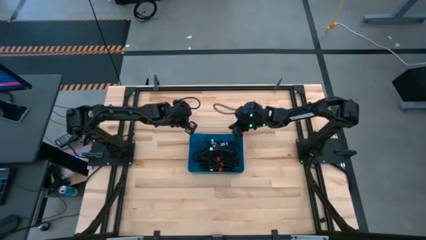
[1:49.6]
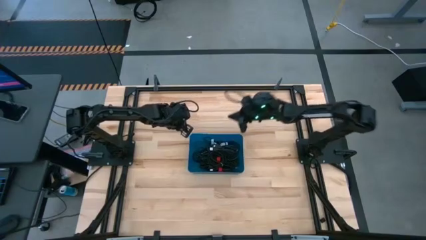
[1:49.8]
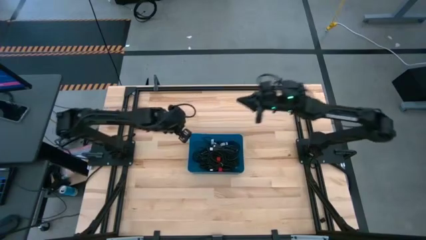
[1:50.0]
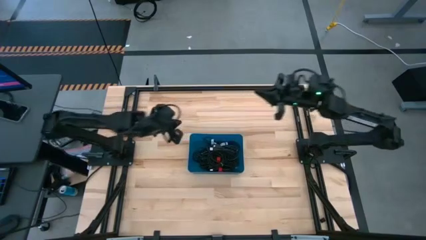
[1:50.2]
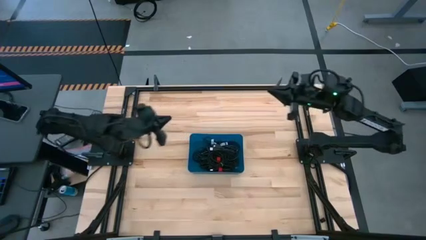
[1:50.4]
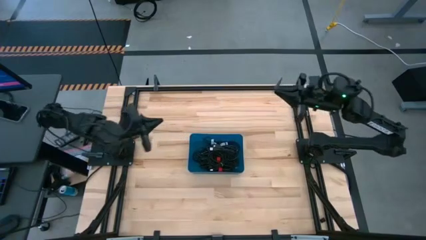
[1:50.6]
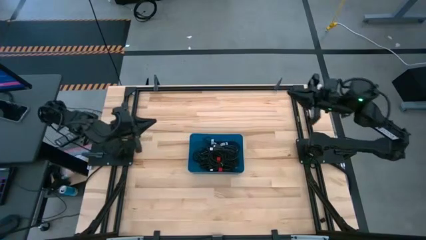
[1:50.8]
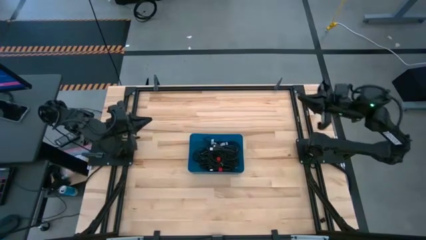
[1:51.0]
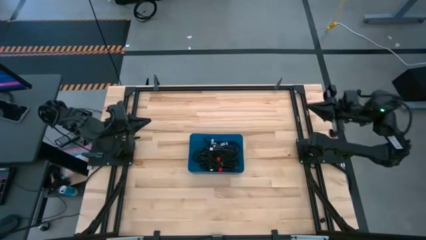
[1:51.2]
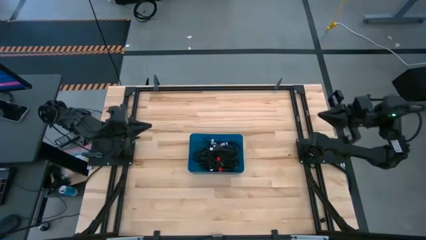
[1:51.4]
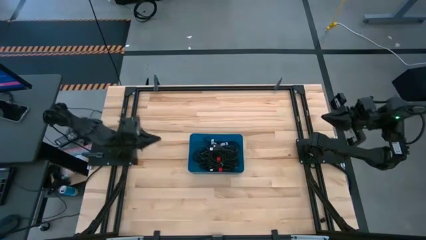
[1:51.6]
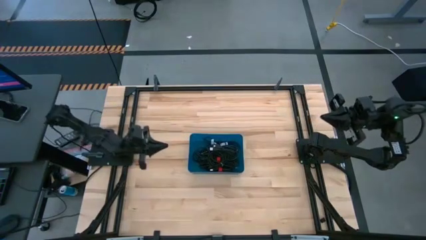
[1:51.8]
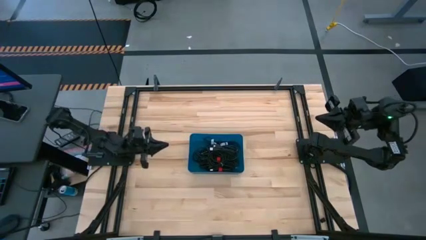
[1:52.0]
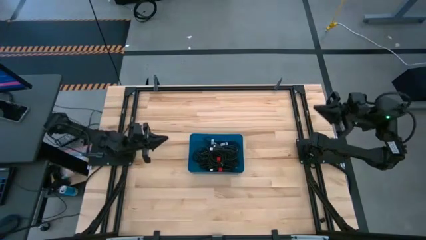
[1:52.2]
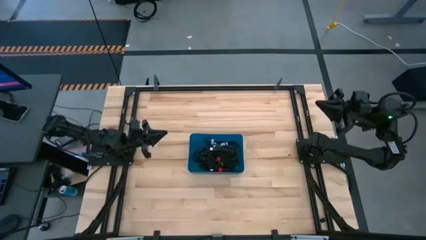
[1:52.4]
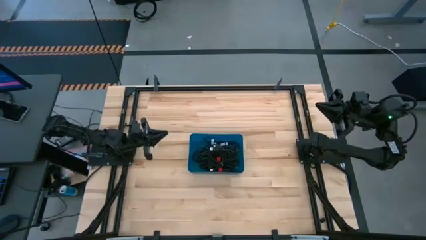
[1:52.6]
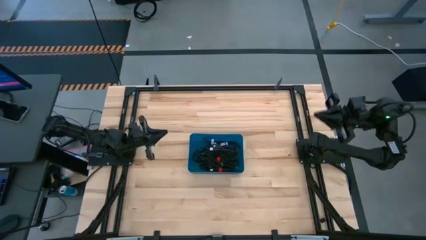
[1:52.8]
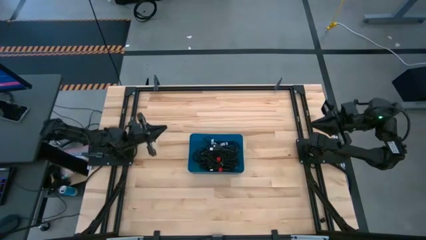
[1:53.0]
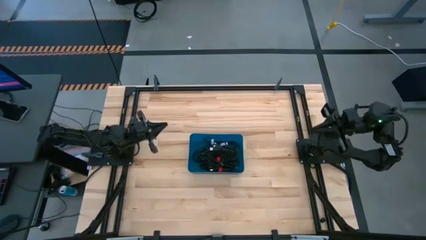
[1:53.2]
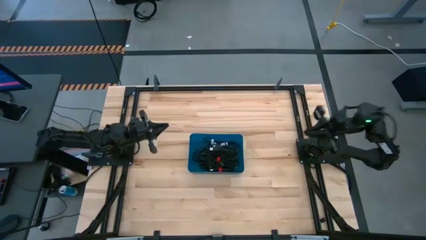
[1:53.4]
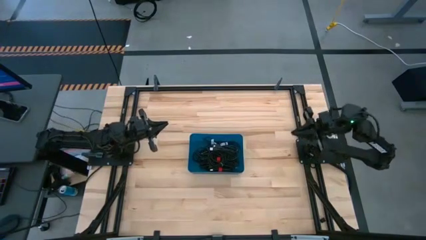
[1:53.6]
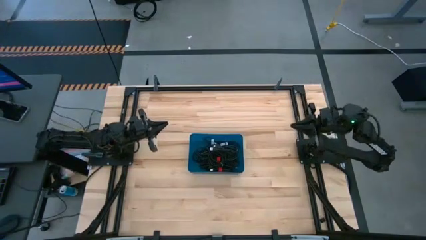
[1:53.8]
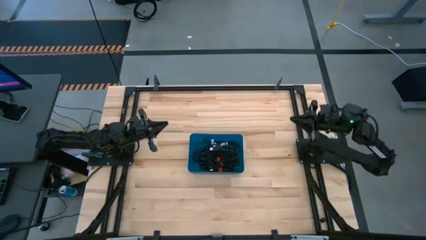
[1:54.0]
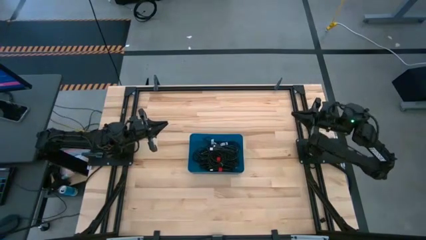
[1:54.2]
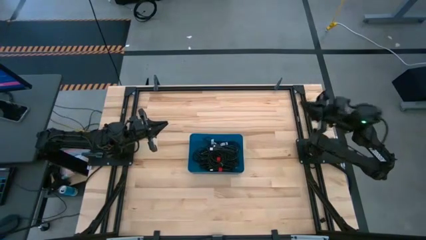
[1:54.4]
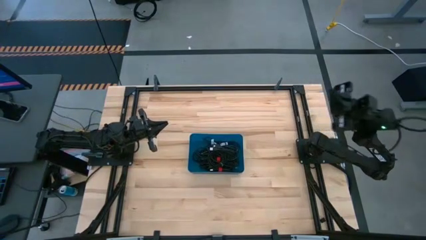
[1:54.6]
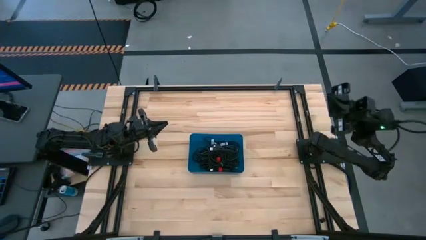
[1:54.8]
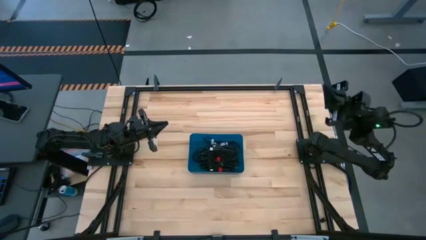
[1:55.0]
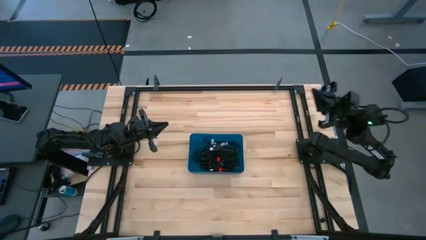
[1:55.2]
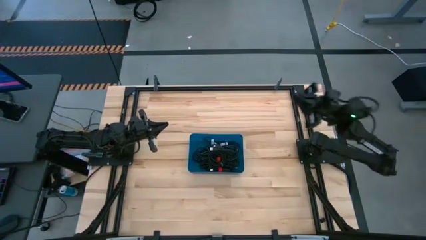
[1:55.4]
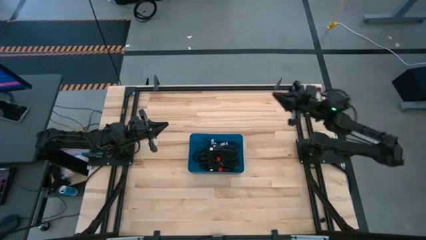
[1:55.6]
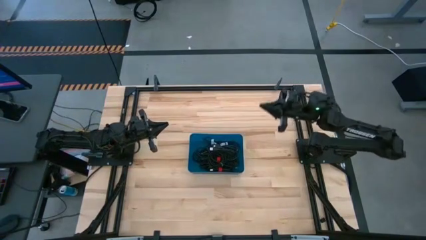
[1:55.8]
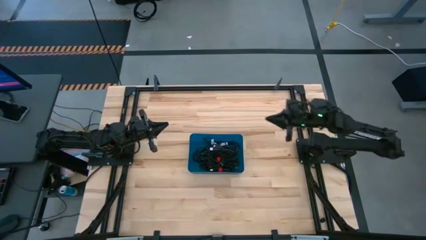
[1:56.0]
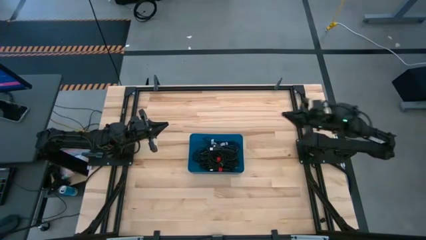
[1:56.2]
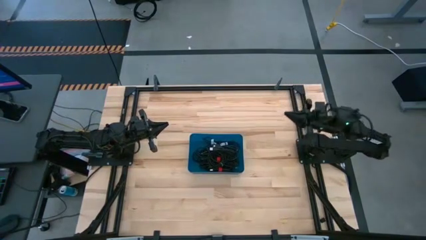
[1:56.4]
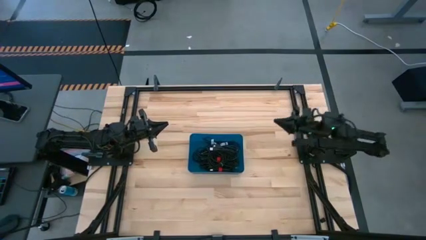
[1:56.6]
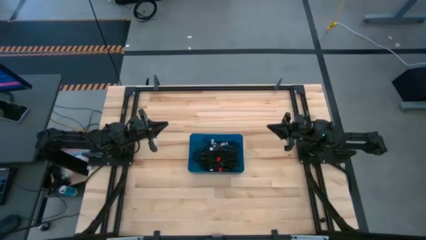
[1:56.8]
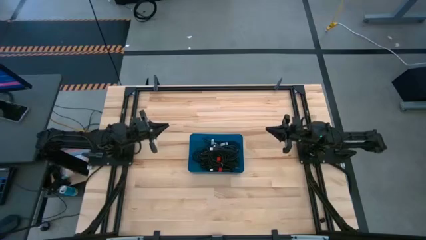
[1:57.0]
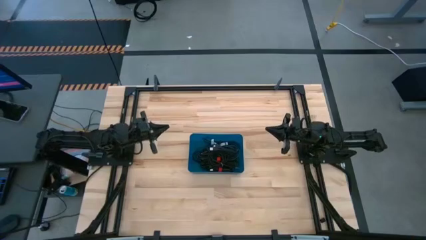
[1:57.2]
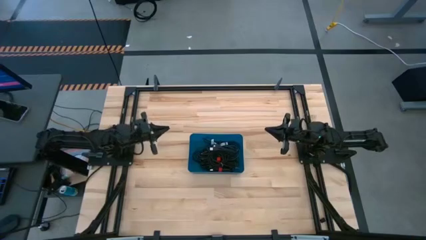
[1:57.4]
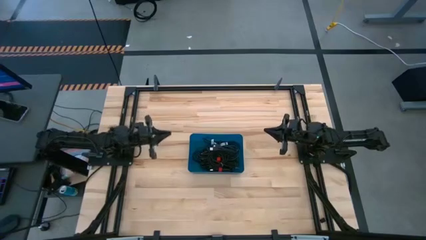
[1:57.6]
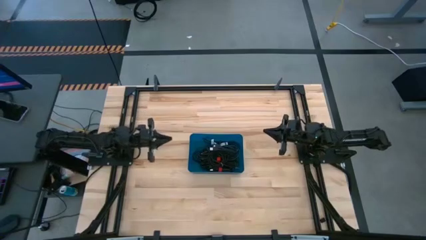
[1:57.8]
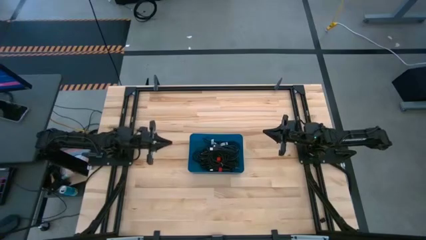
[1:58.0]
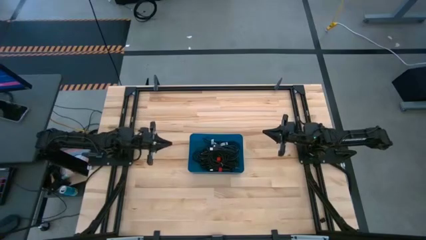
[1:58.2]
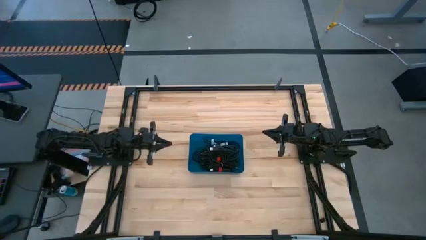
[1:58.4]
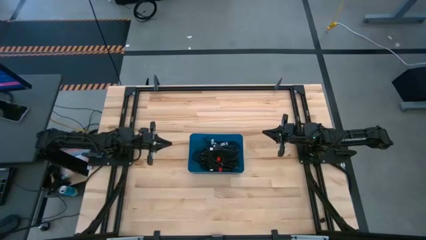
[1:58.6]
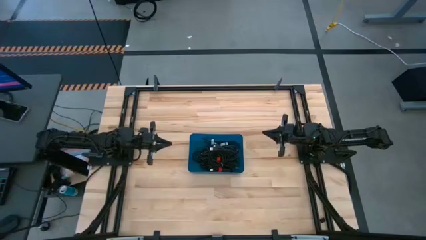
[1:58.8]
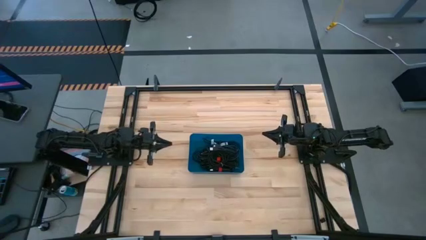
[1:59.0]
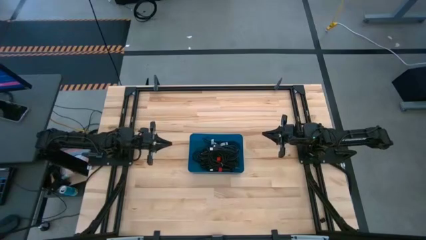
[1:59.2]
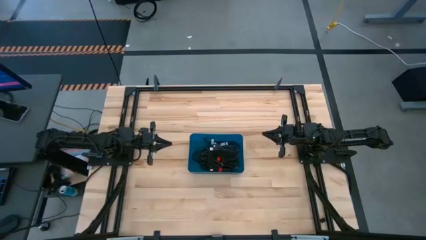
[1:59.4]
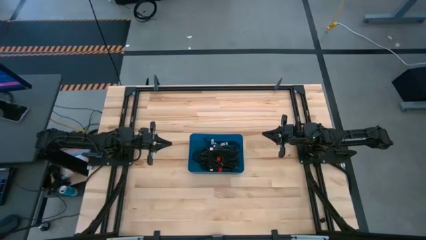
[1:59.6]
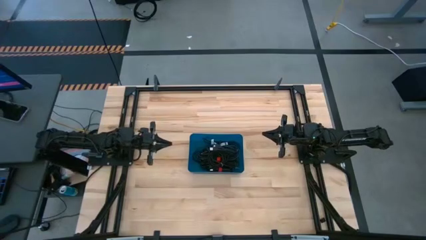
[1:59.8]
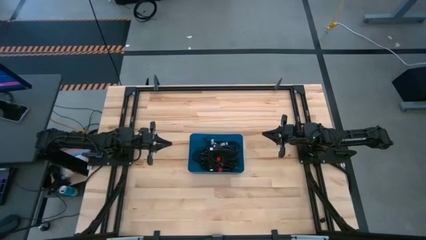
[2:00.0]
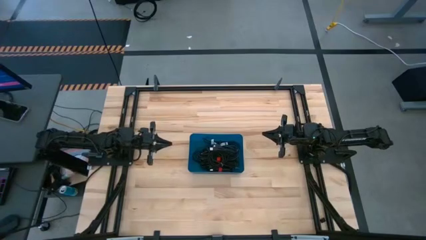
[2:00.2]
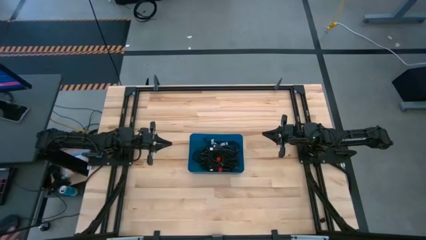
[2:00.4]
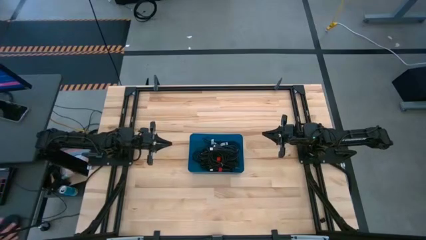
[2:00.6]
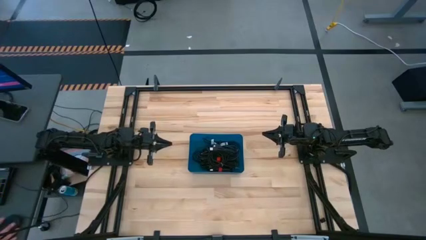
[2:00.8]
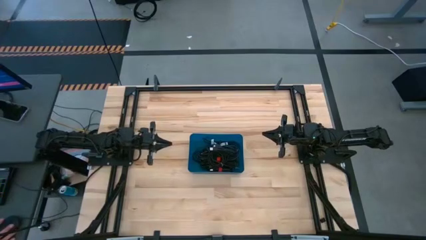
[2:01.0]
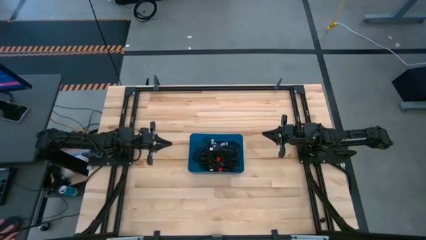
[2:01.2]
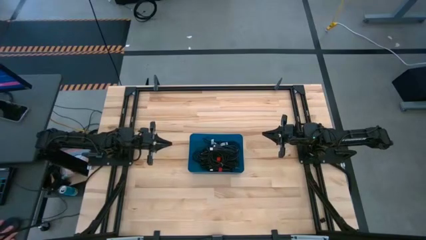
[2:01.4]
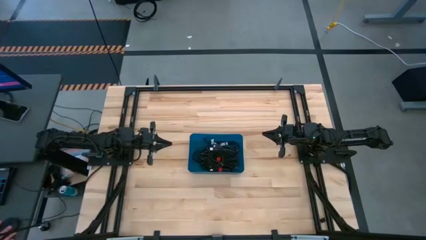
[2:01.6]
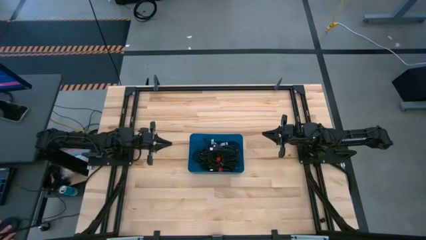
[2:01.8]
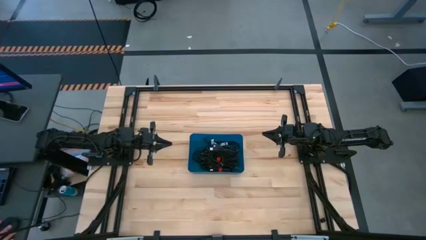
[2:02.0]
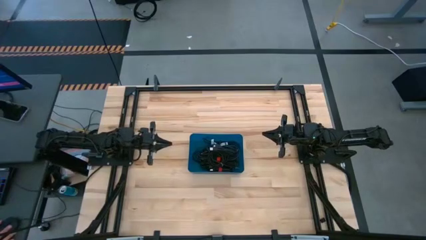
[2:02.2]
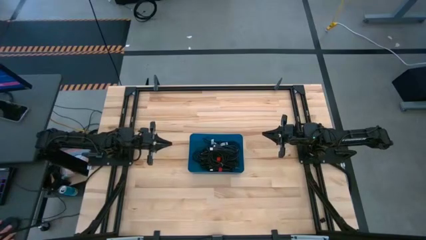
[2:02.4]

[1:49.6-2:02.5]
Task: Pick and place USB-C Cables
Return to Home Position

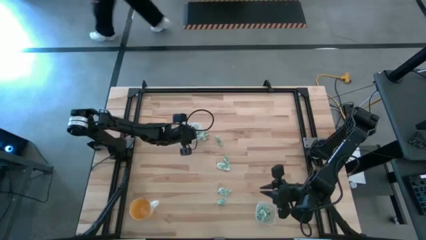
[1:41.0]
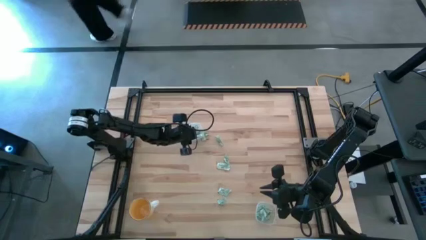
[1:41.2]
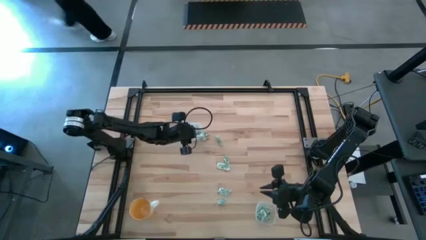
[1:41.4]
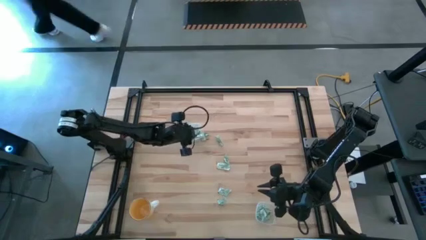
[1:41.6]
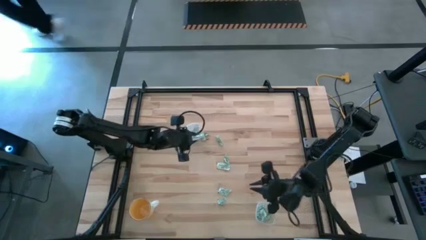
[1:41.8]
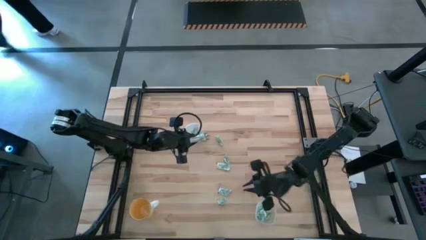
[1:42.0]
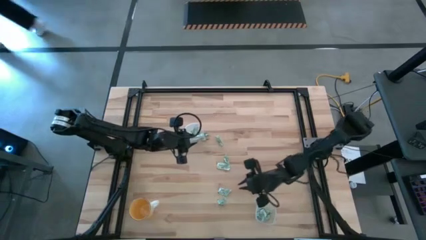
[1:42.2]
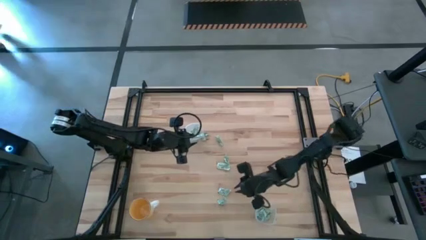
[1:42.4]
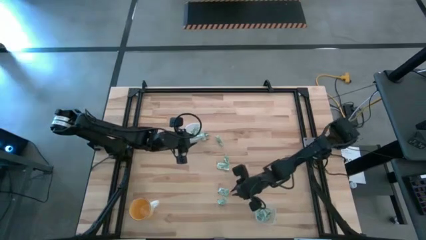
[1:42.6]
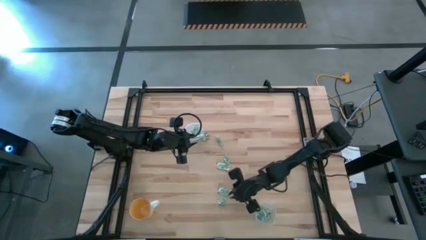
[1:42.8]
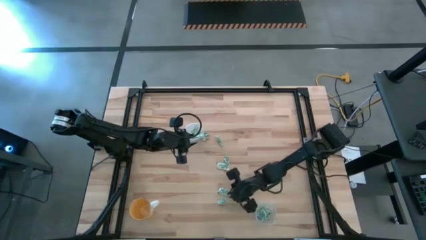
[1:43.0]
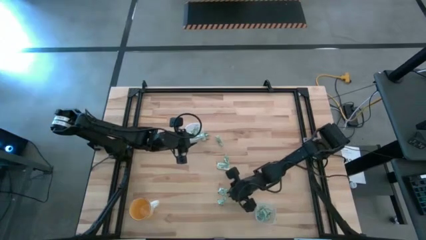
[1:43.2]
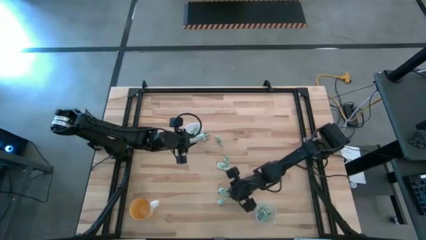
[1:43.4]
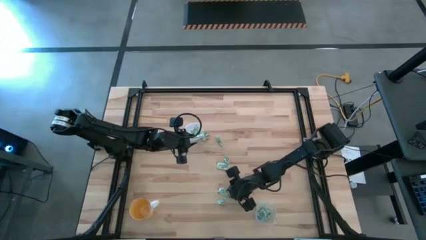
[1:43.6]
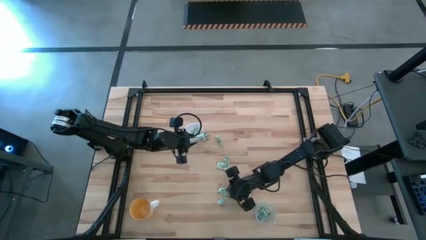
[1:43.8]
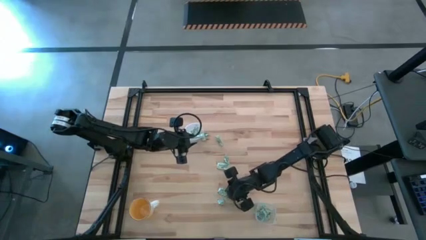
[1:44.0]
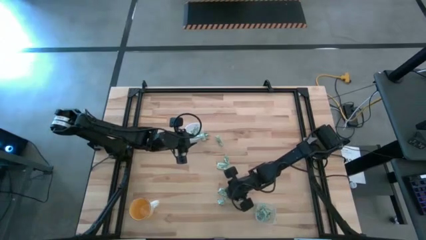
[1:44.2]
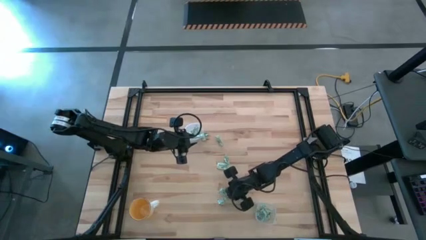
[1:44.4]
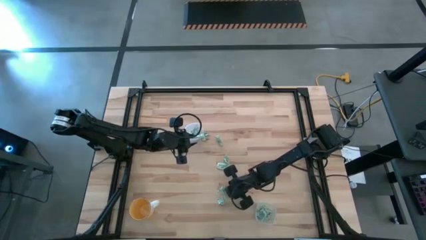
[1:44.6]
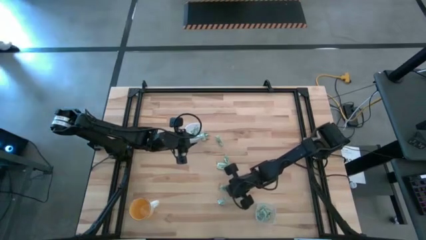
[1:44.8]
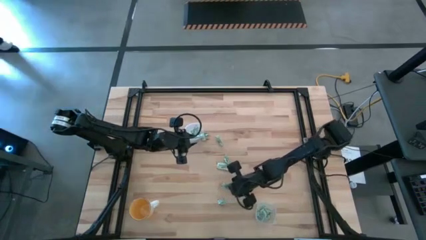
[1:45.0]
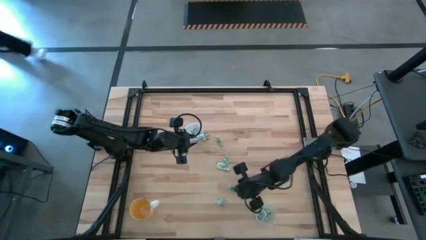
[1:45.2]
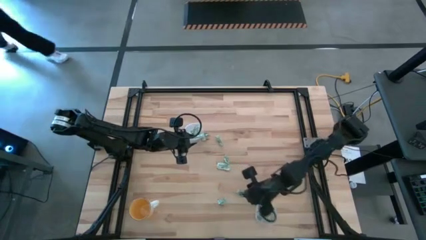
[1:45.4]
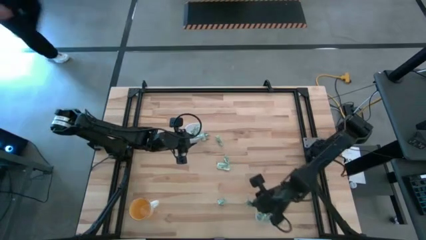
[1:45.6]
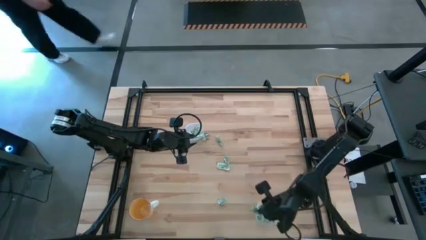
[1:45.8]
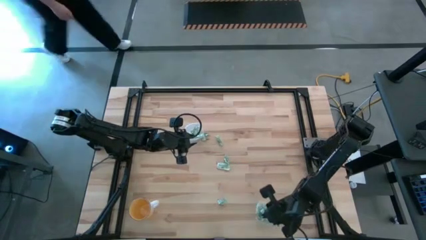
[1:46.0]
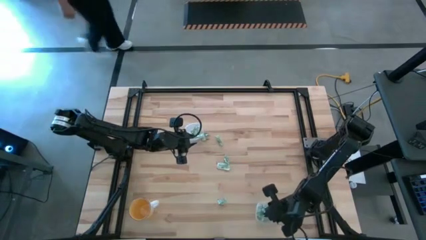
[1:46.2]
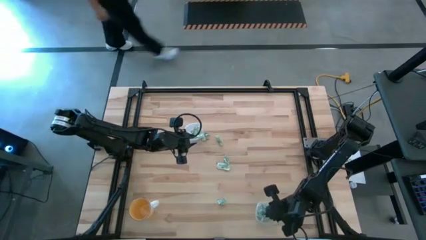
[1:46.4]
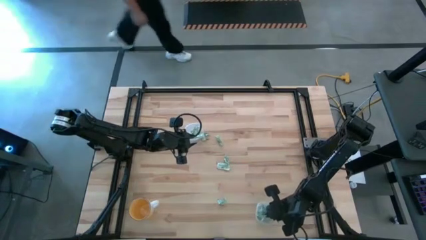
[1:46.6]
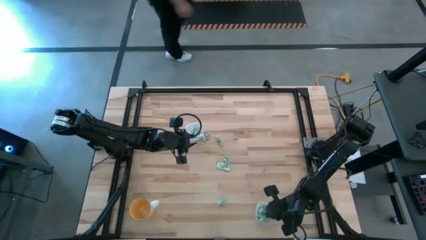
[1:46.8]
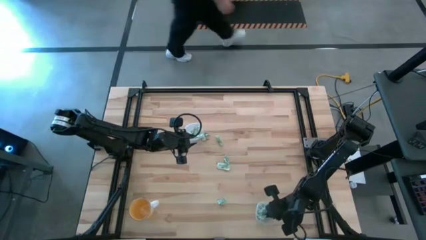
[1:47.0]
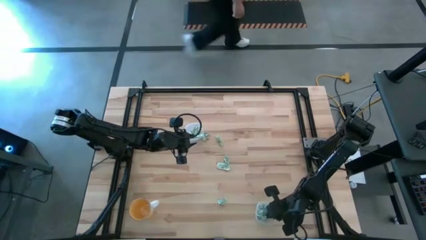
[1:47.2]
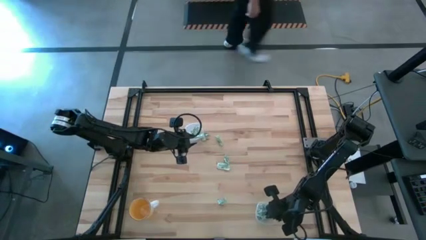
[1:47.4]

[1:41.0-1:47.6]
Task: Pick and place Stevia / Truvia into bins
Put the stevia packet into the bottom transparent container
